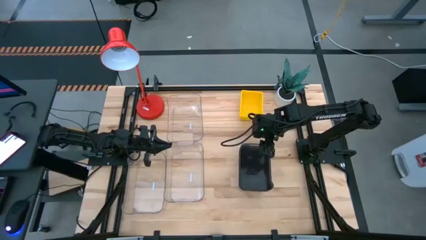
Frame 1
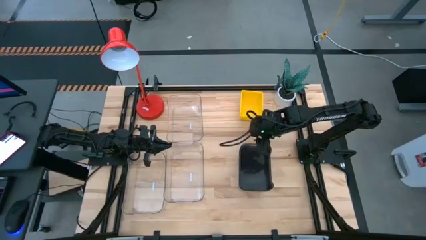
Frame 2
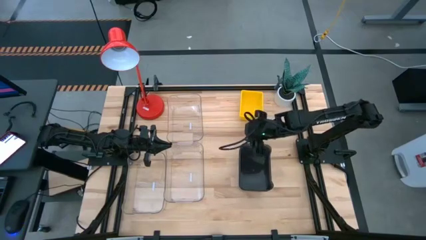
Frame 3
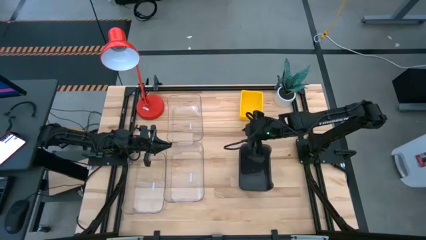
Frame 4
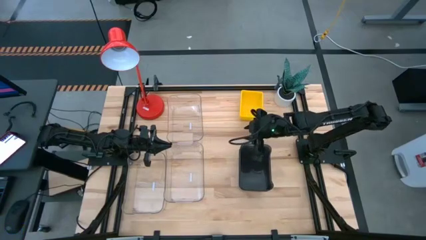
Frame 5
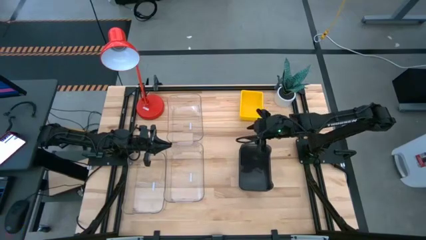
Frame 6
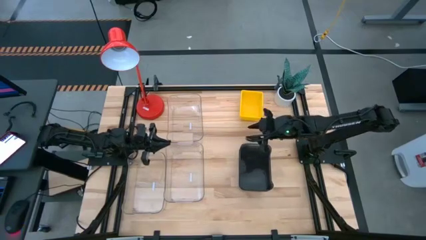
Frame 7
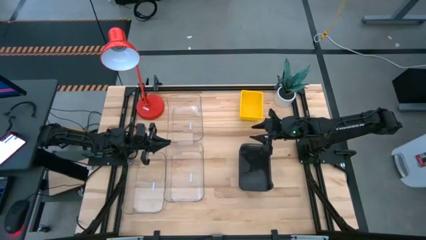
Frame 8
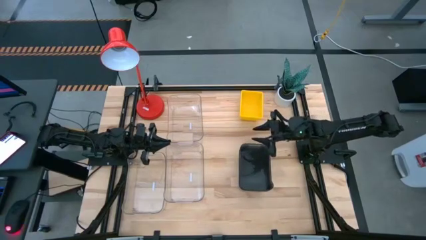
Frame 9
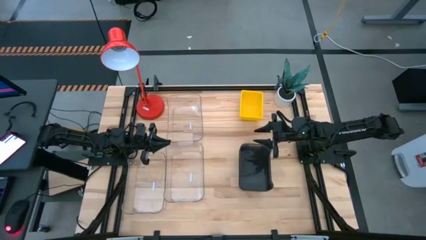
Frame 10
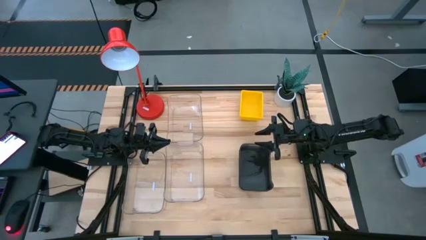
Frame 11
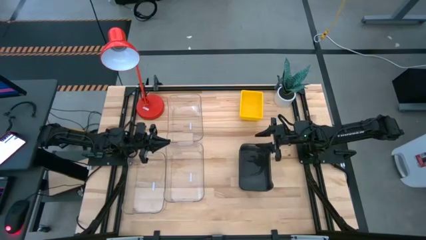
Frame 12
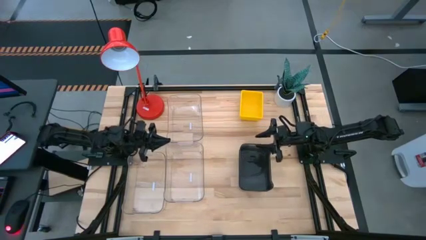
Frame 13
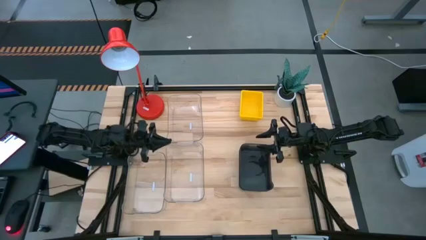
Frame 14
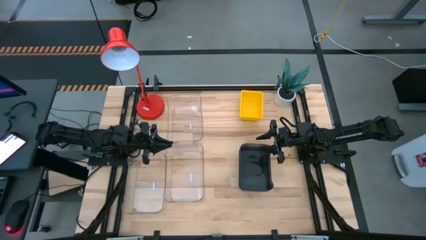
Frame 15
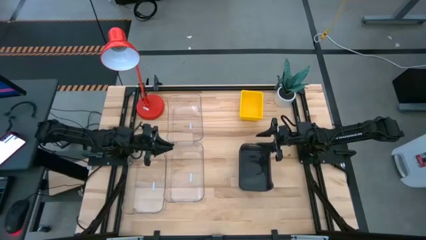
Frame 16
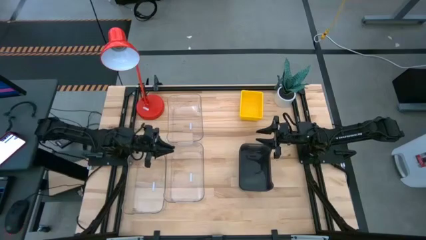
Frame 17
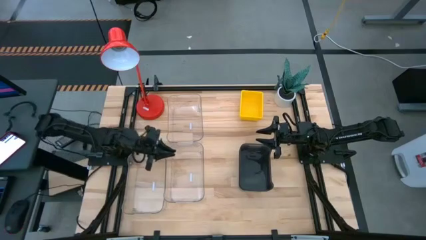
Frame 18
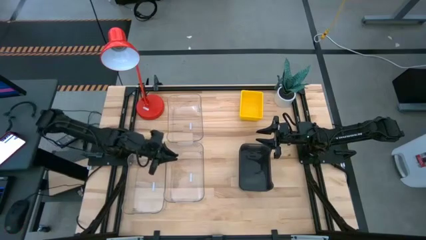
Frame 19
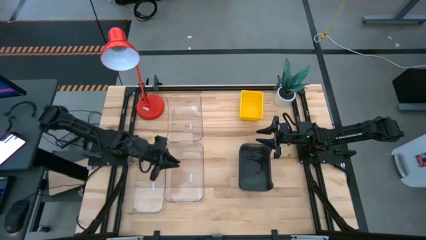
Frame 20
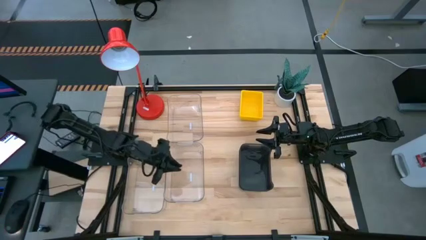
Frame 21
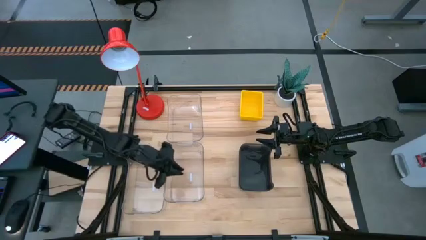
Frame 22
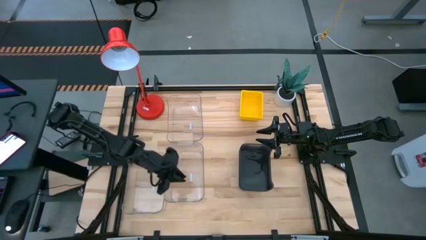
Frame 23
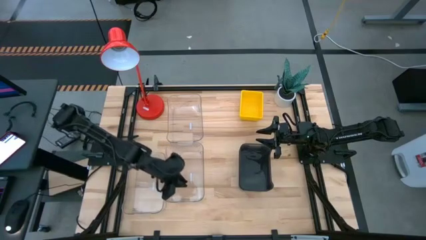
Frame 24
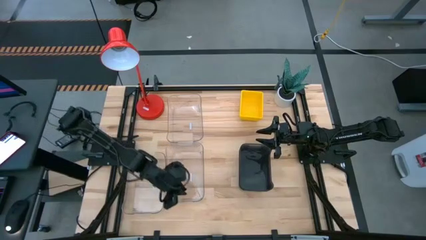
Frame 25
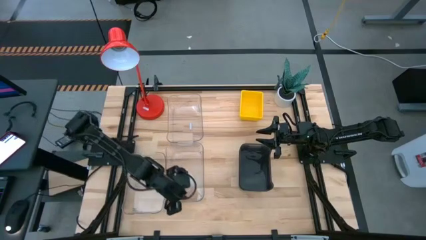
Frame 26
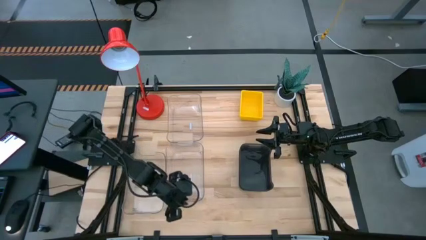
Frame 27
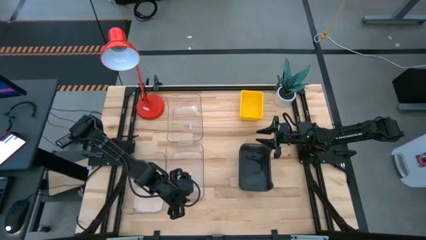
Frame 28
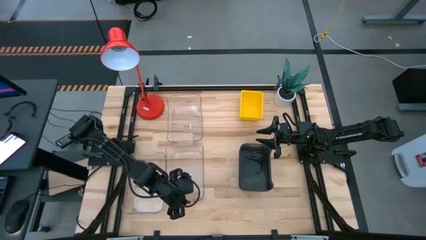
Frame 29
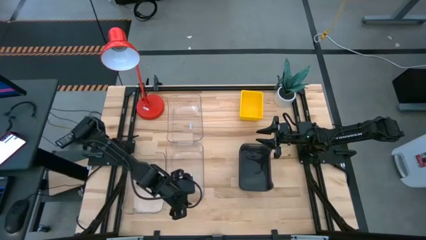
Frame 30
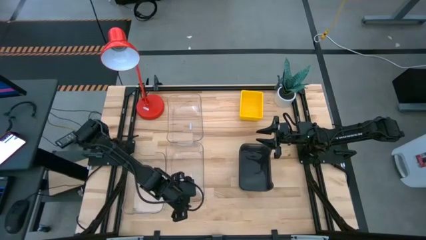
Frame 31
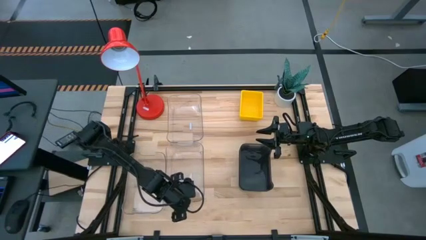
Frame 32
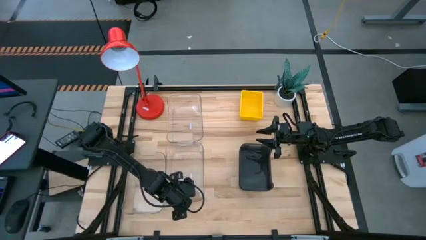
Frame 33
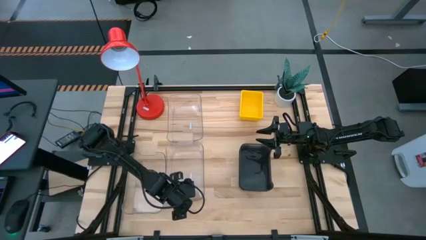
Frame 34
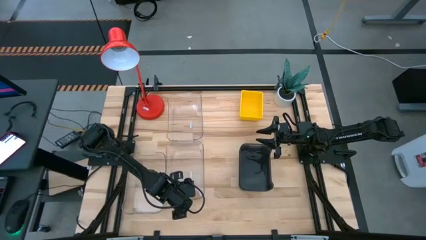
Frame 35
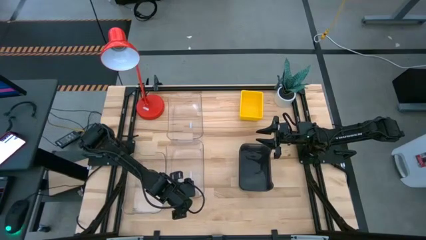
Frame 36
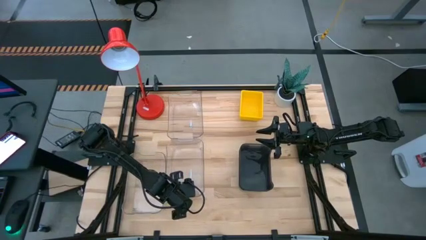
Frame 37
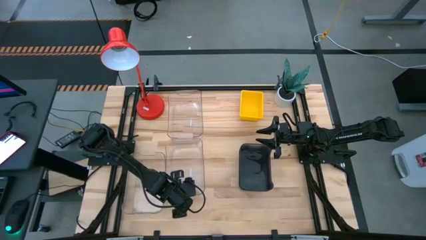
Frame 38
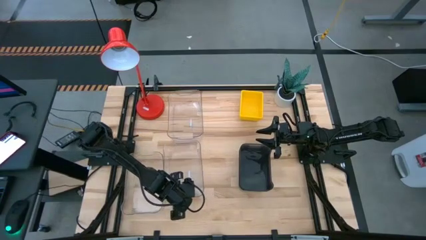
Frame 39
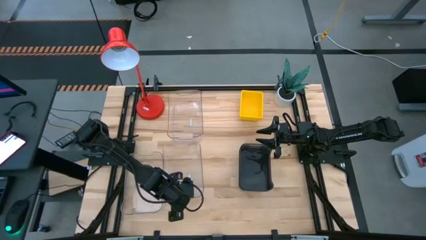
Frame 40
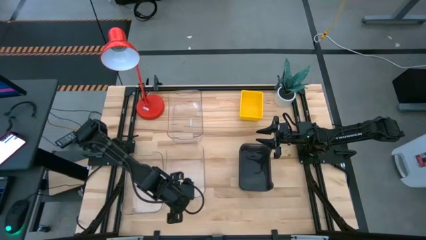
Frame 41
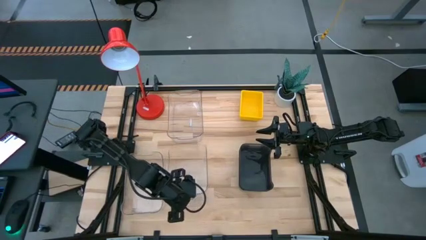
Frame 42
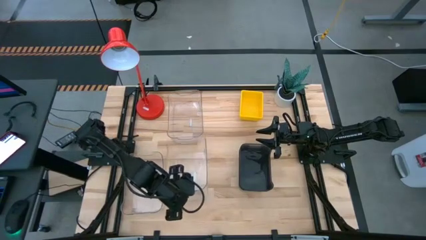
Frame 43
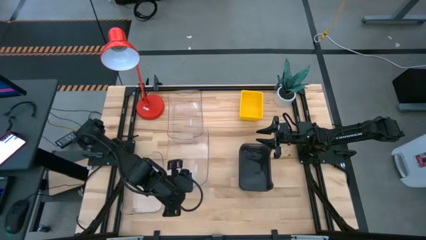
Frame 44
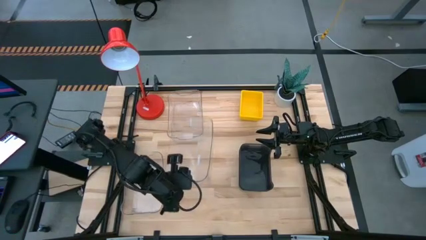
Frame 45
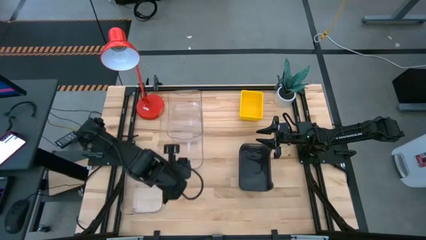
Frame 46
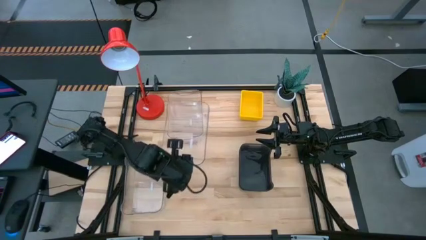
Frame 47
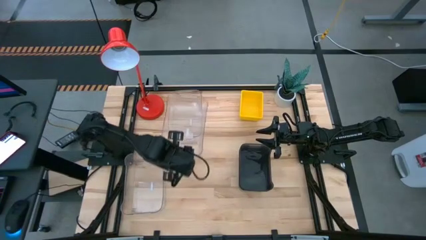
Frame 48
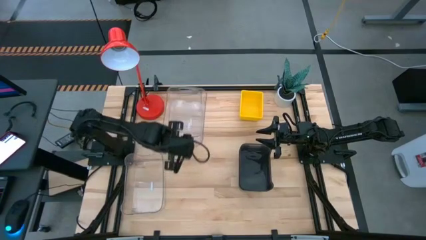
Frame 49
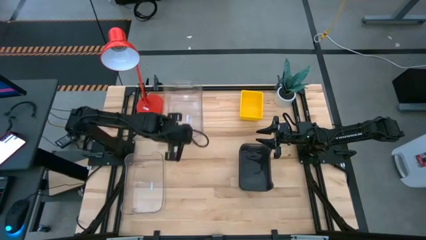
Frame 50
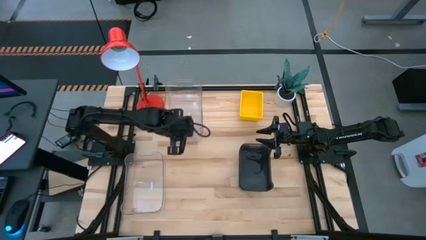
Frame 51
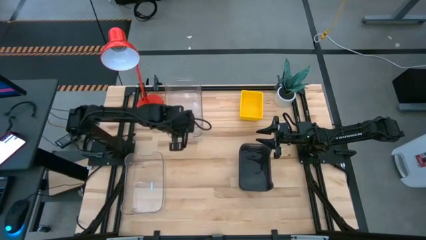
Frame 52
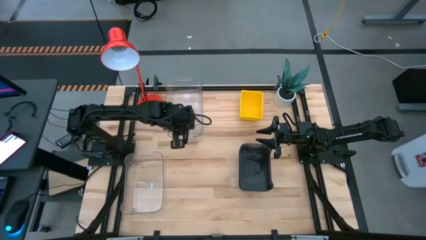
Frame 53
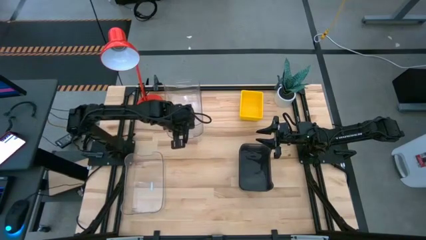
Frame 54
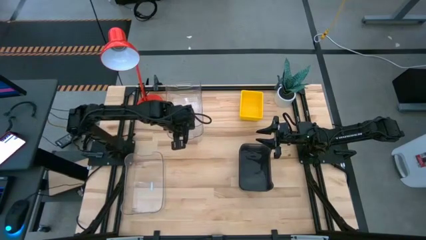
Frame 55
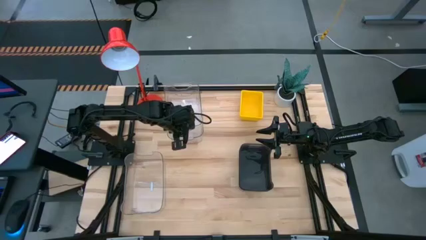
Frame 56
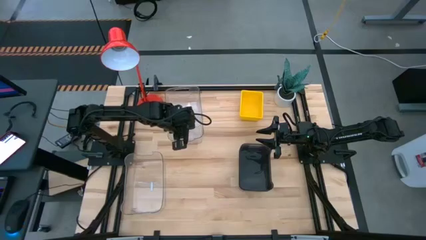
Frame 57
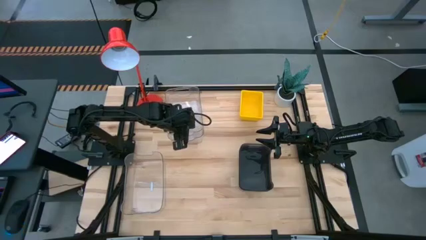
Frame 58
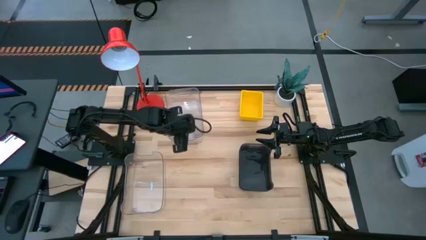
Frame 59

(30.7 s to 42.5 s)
Stack the right transparent bin on the top transparent bin
